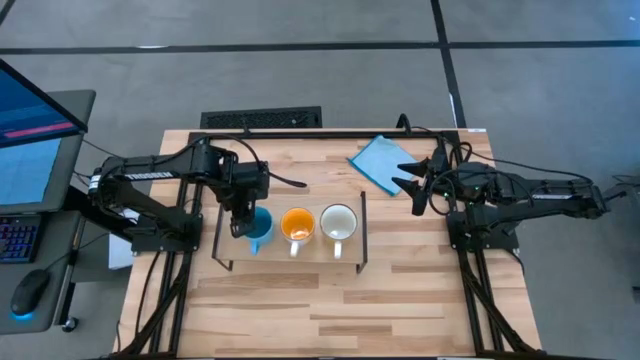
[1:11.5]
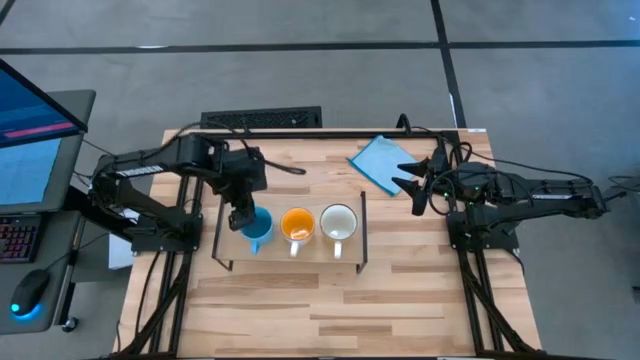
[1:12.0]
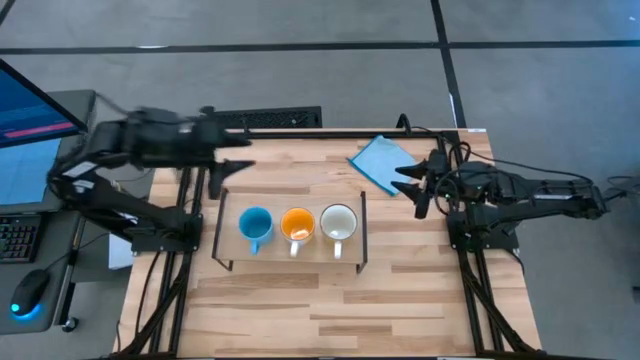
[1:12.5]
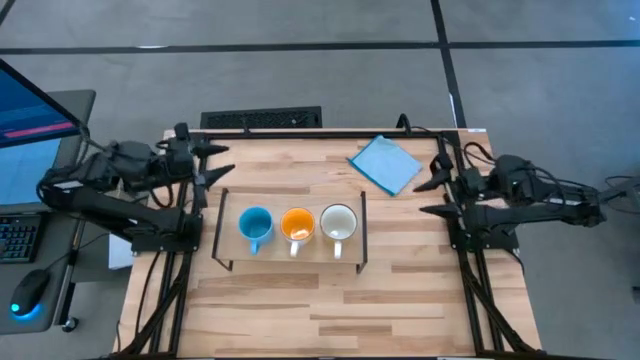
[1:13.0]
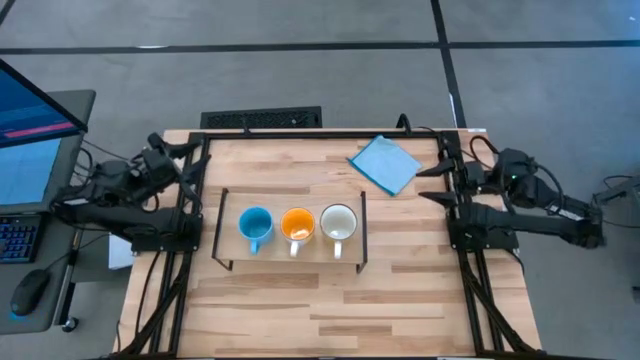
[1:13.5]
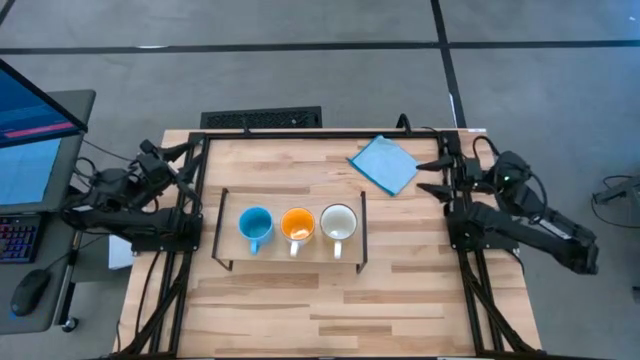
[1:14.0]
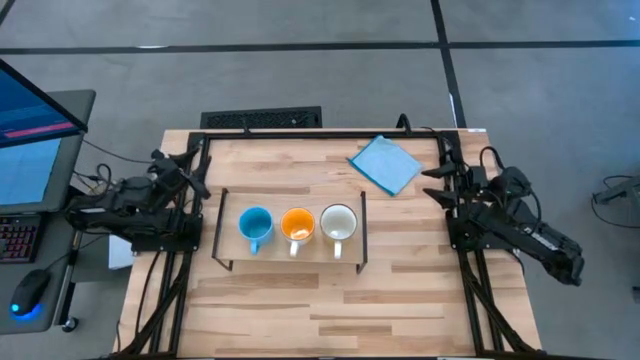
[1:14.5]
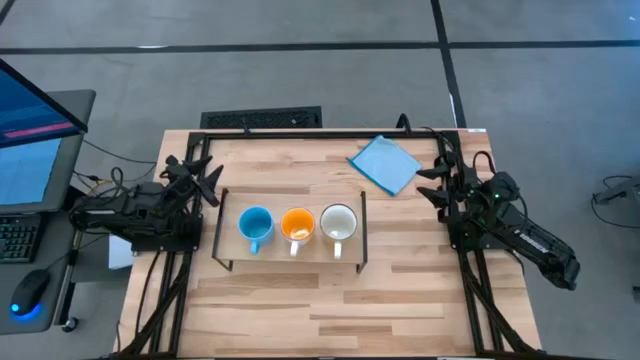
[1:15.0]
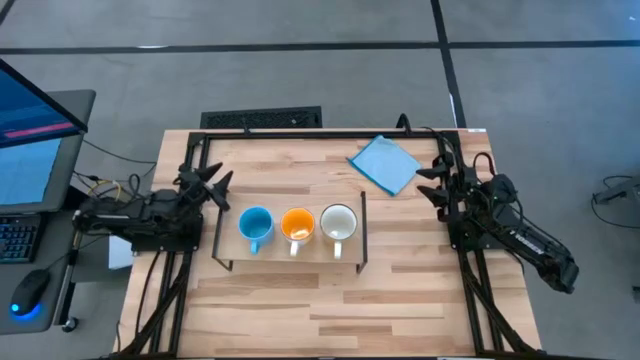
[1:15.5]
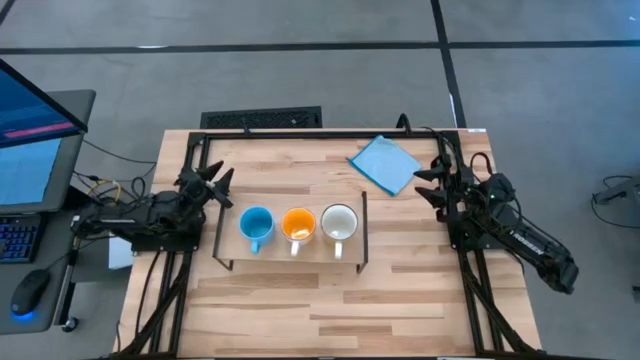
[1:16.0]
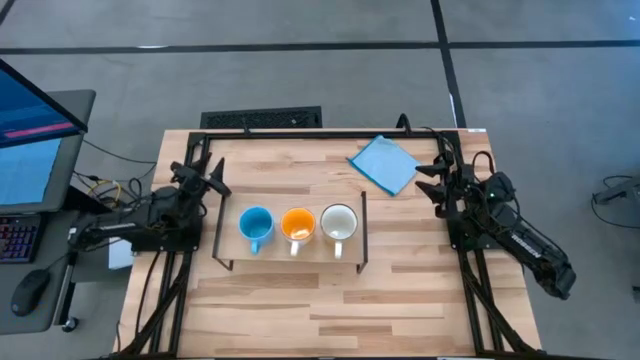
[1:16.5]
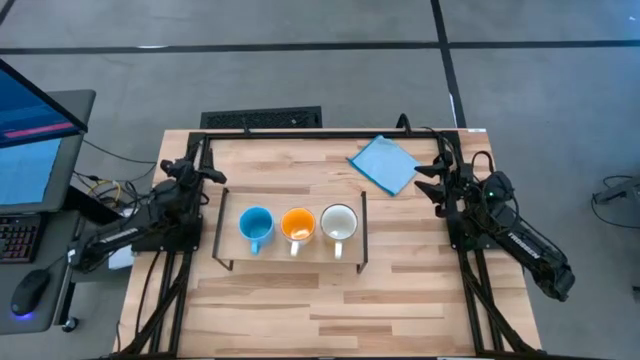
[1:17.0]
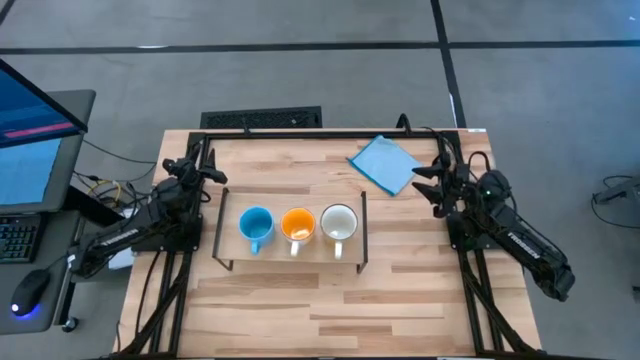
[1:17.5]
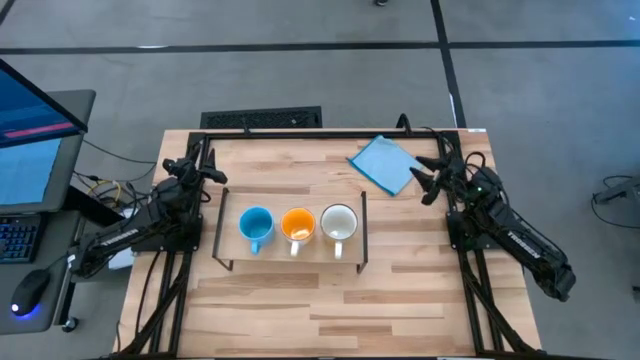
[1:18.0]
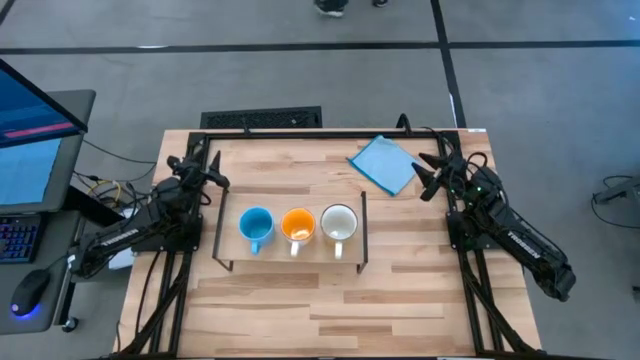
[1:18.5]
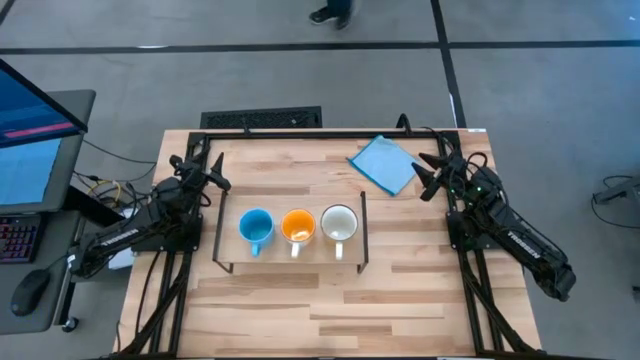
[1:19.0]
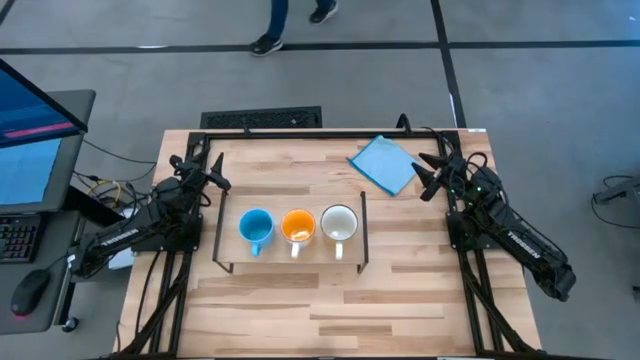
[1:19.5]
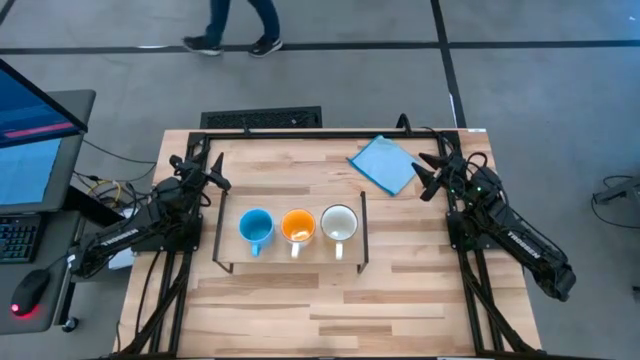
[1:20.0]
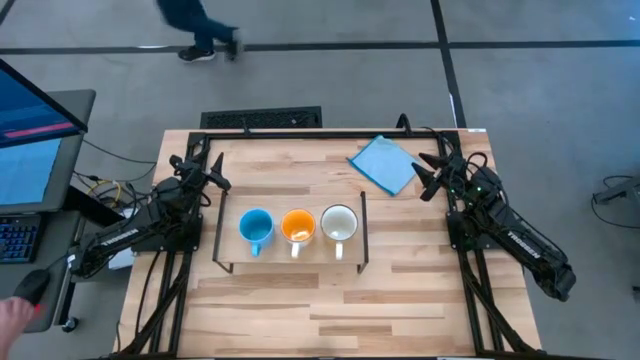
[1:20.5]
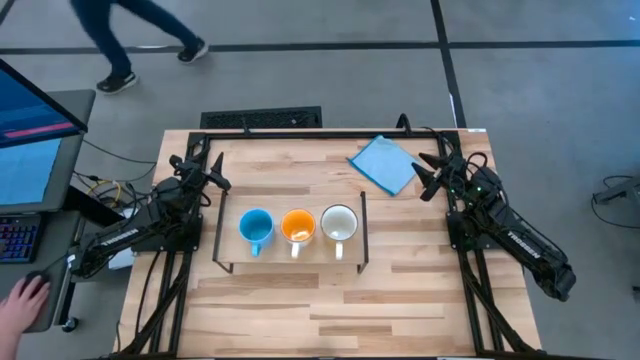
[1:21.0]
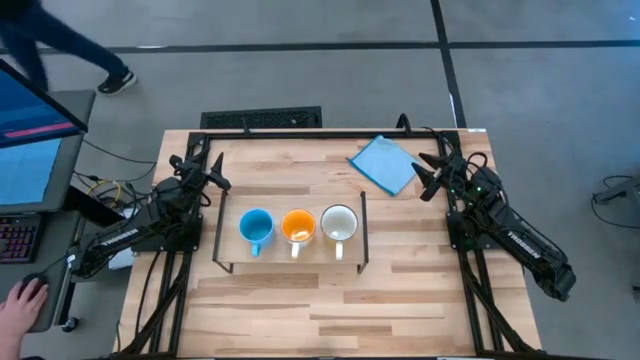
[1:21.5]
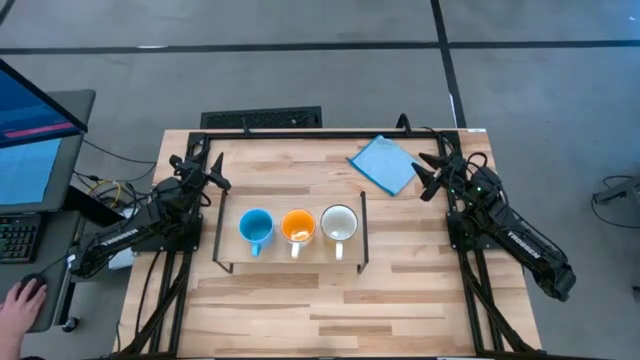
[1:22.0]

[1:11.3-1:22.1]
Task: Stack small to large cups/mugs on shelf
Return to Home Position

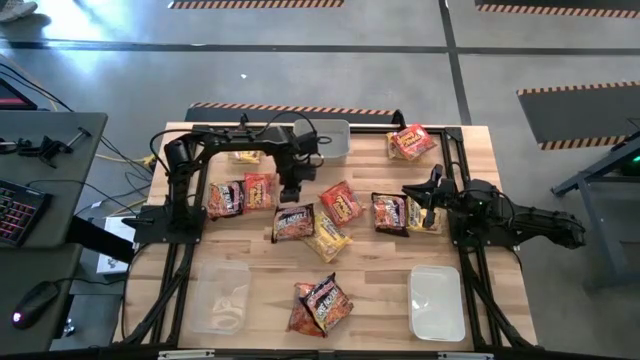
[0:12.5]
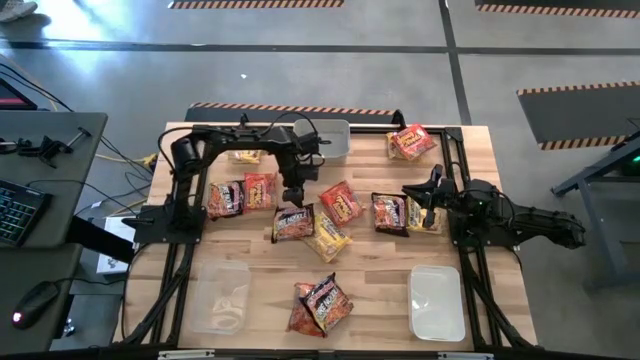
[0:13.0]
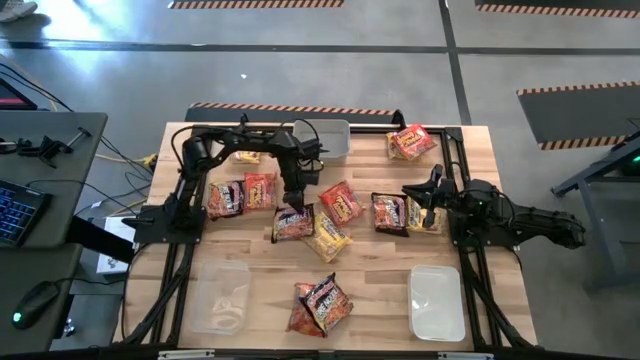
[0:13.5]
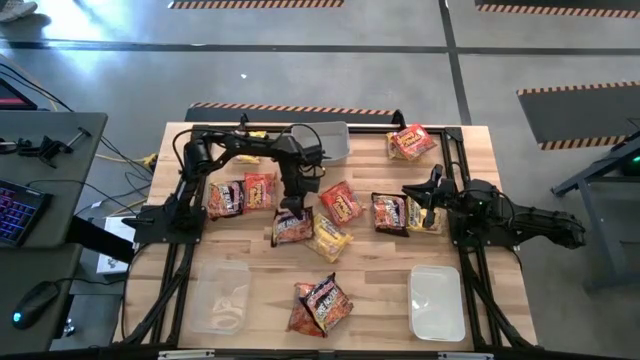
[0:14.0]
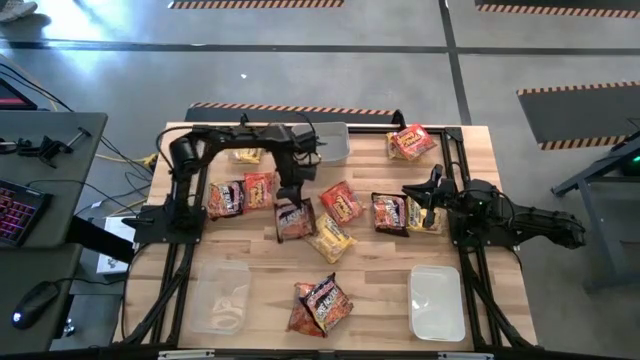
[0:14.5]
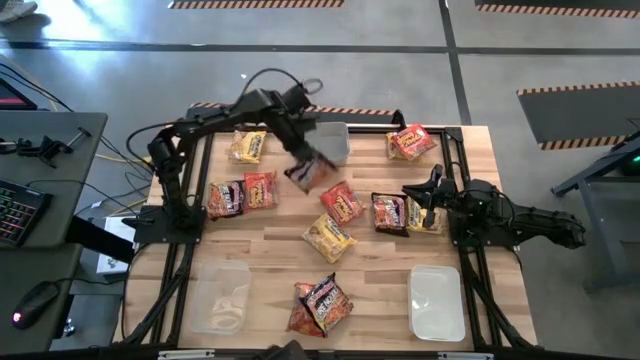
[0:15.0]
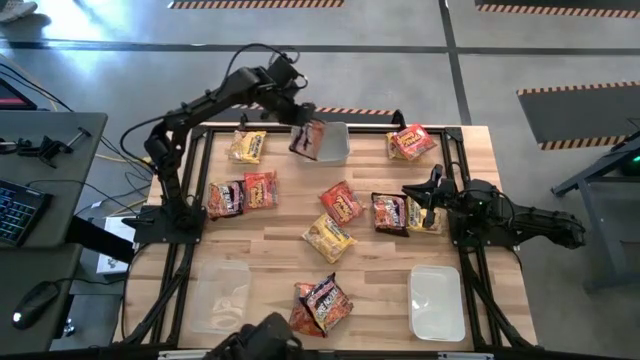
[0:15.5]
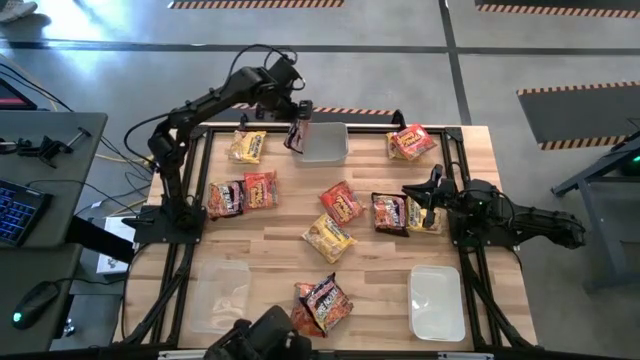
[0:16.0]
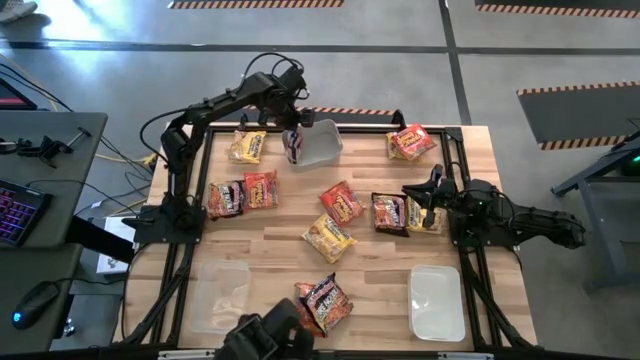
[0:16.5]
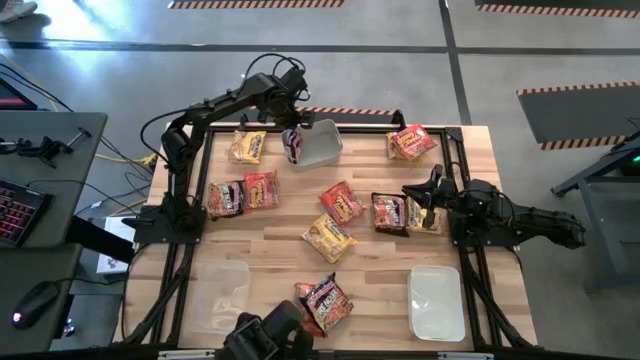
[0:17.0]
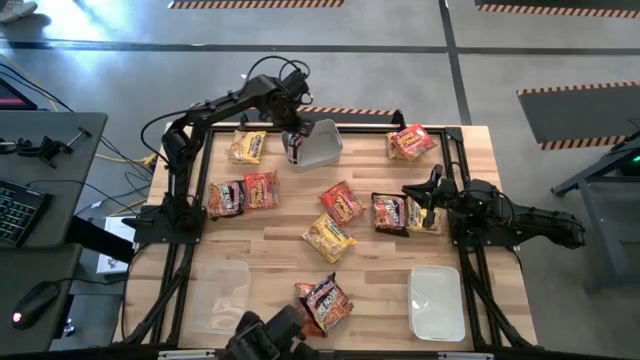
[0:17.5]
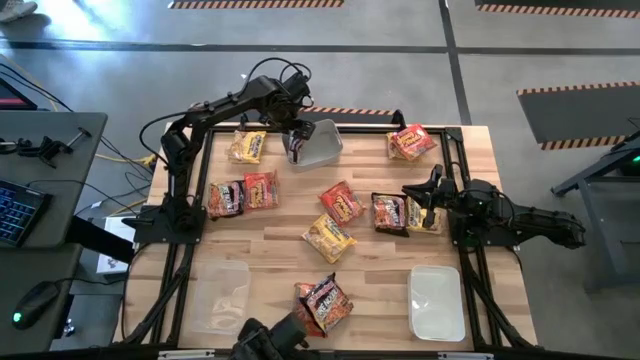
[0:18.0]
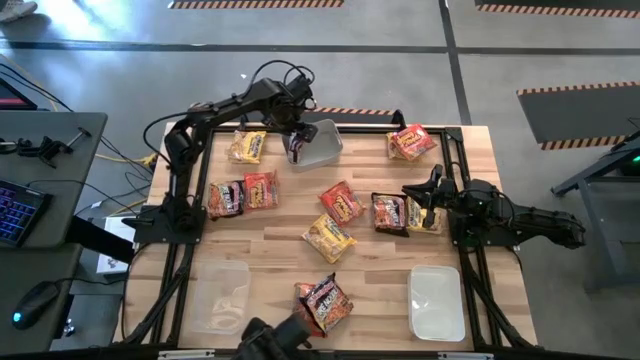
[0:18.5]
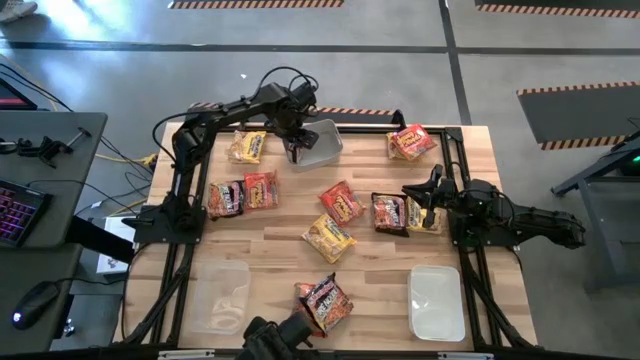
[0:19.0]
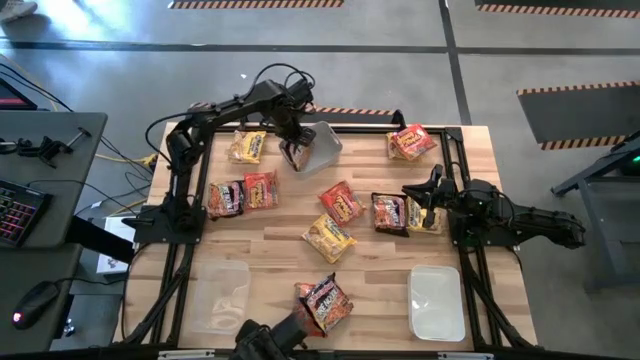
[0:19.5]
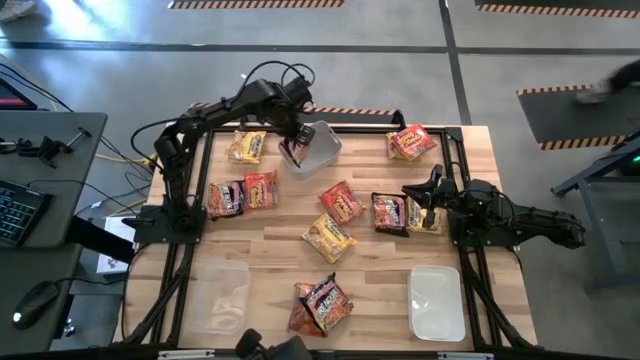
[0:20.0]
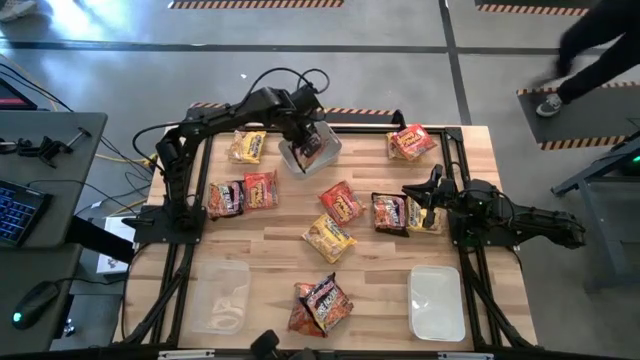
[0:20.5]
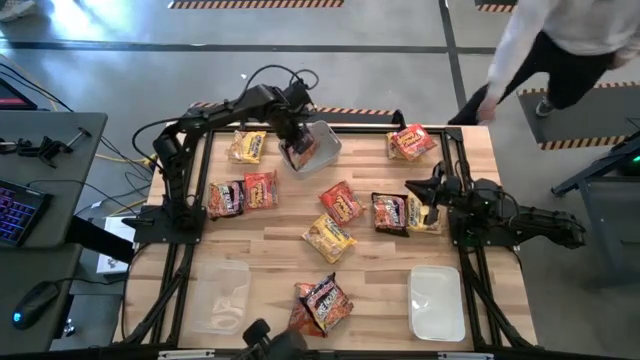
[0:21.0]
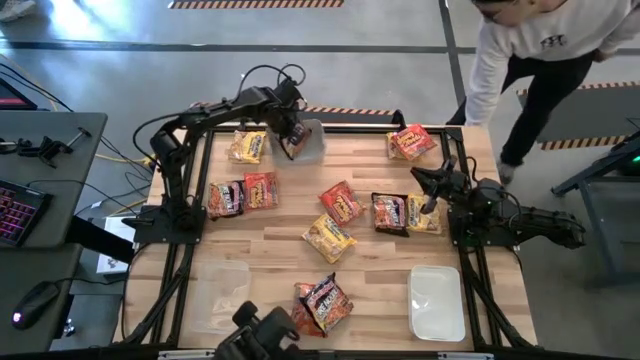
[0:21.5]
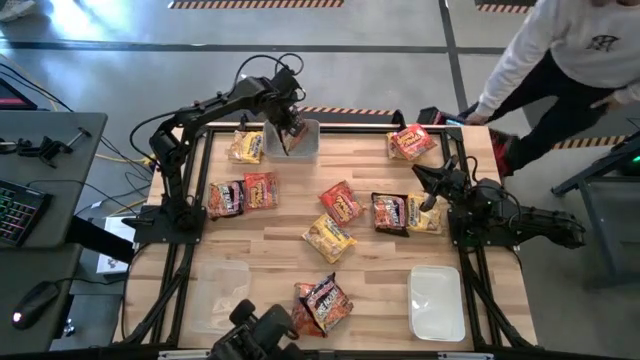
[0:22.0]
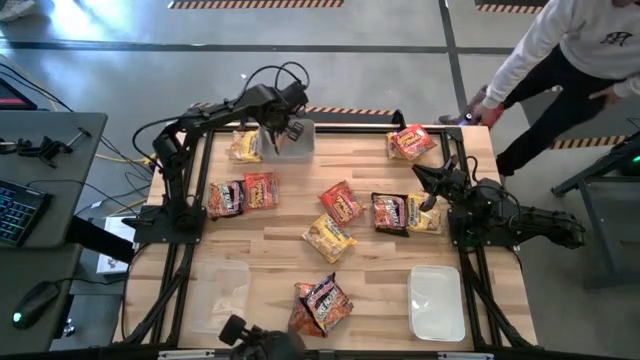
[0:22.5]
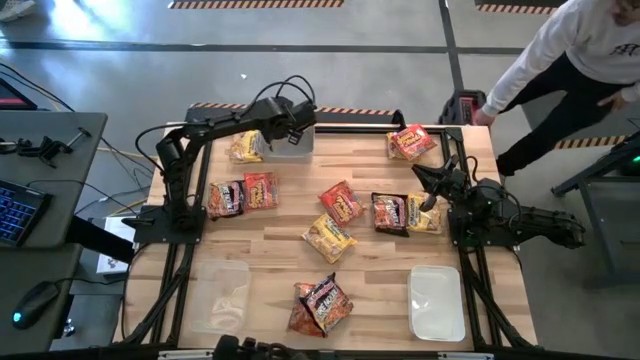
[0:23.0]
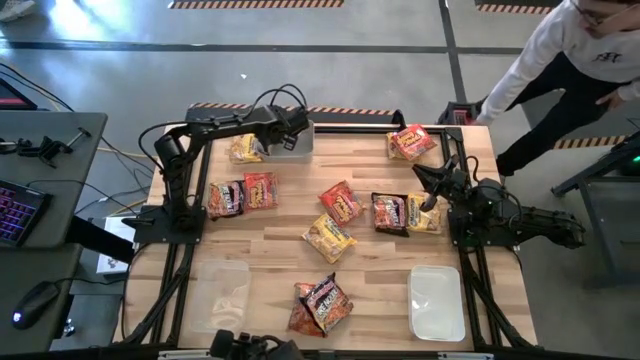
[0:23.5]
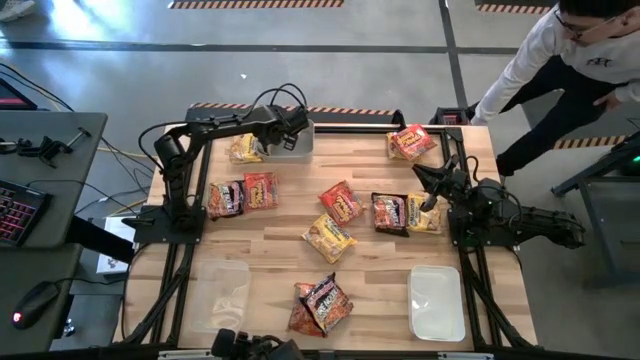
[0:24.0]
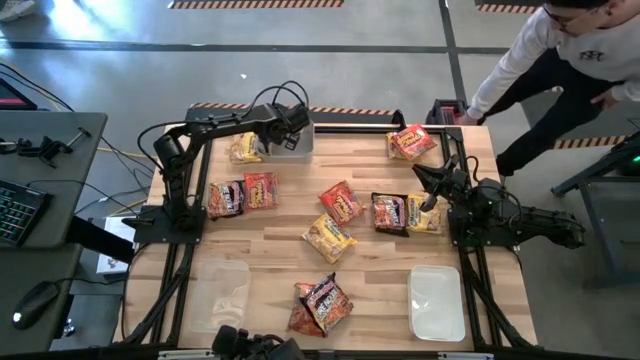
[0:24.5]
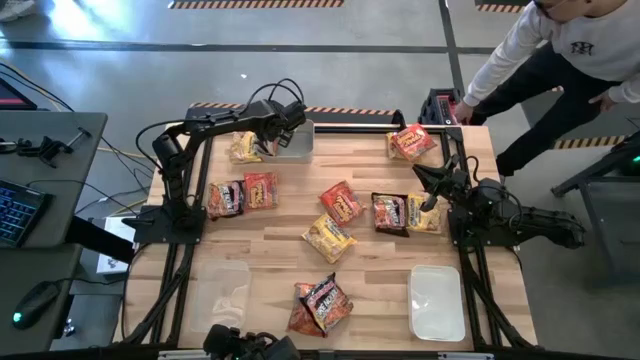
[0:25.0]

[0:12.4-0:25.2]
Task: Sort Maruchan noodles
Put the middle black noodle pack into the gray bin
